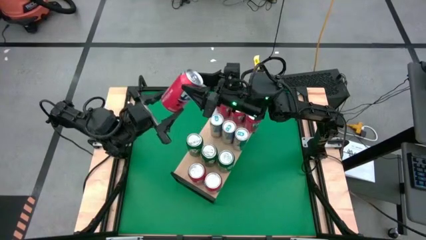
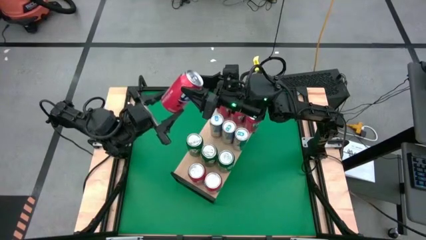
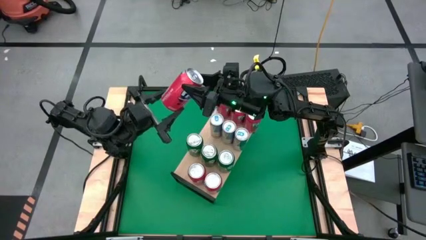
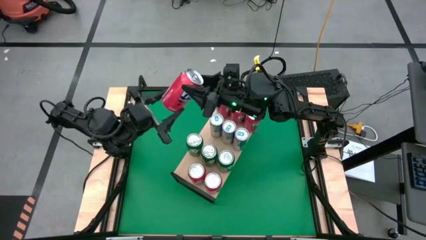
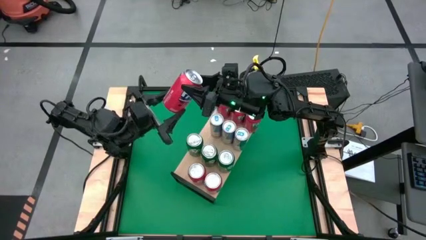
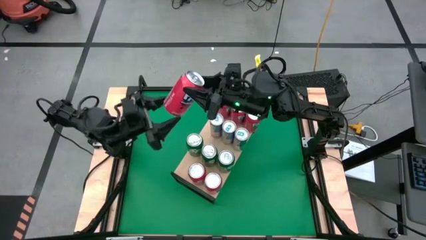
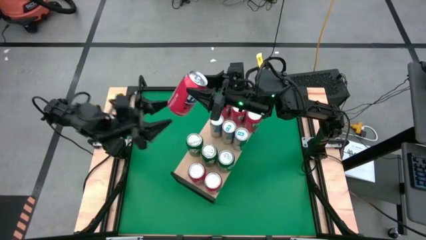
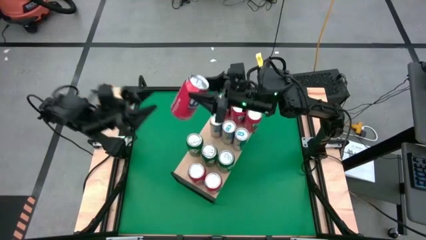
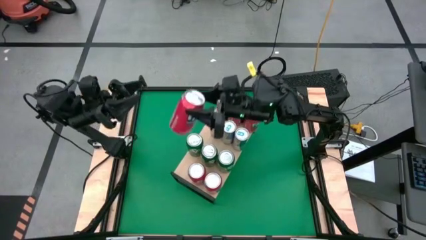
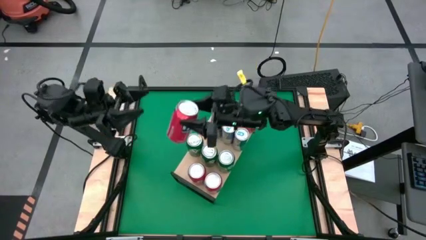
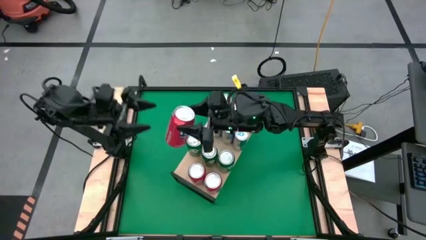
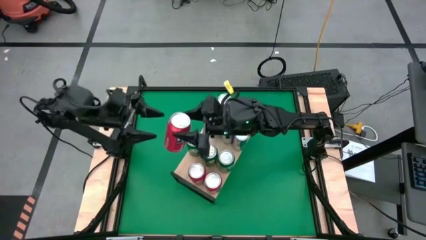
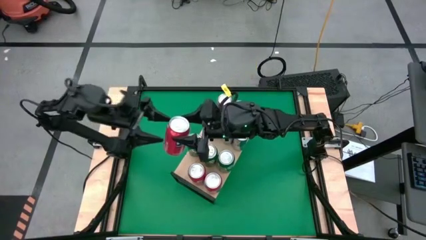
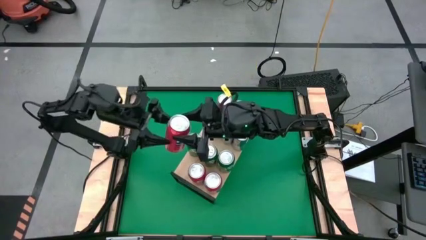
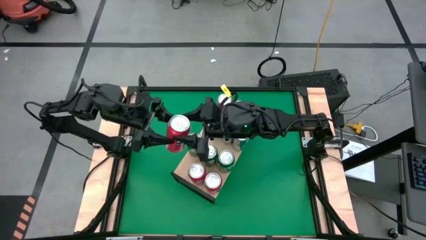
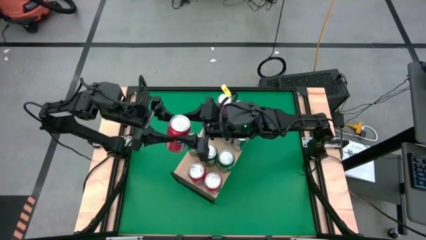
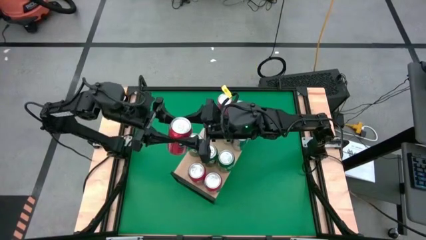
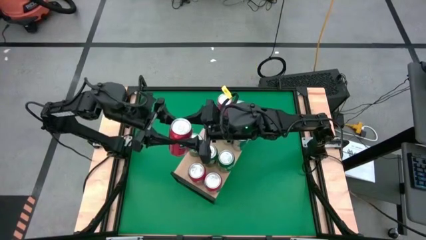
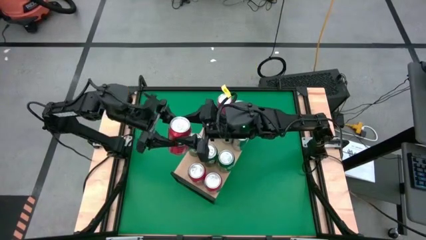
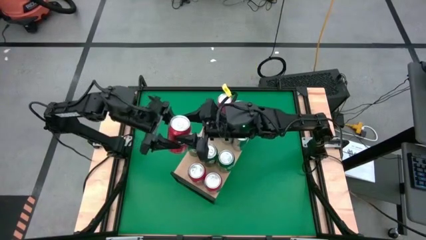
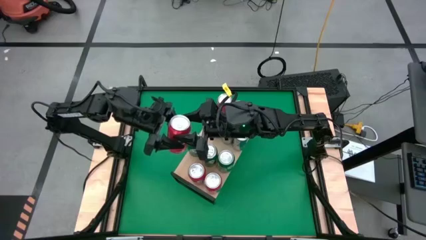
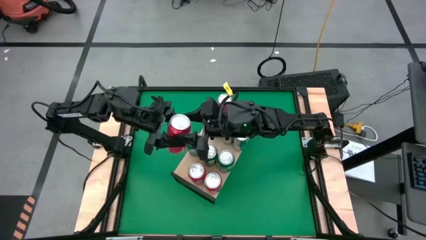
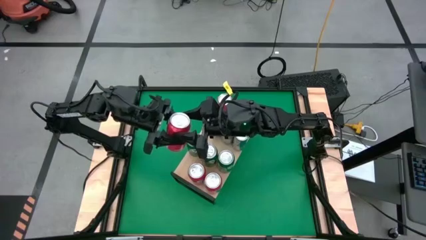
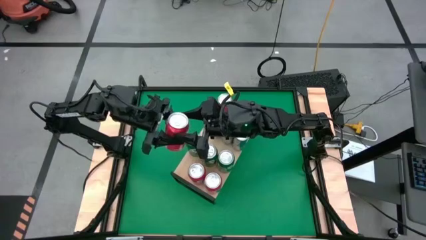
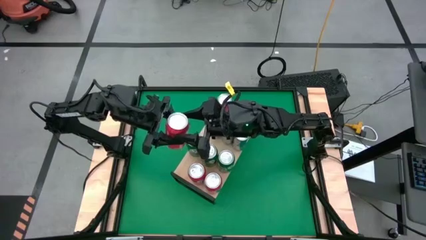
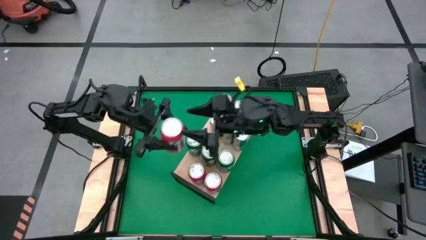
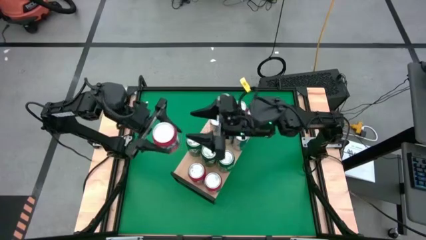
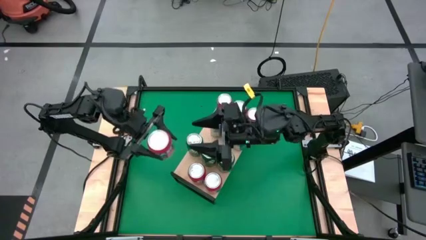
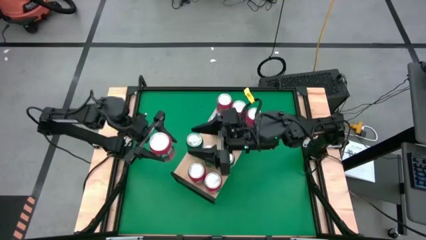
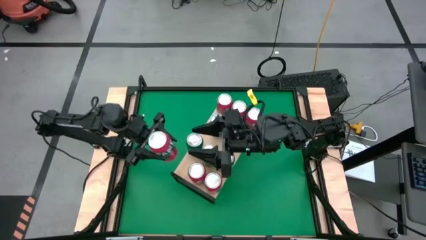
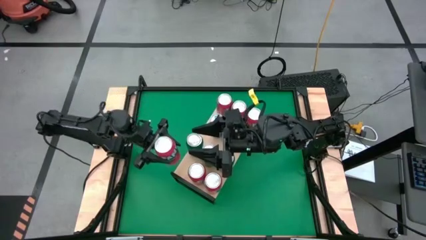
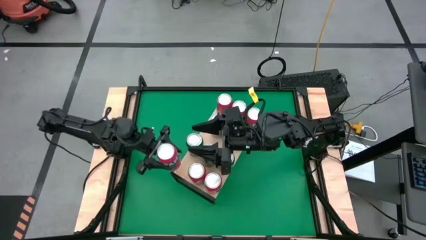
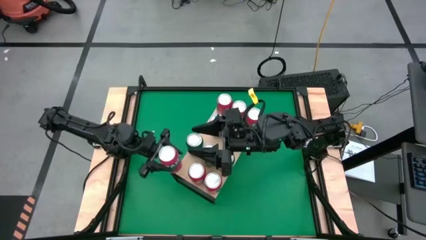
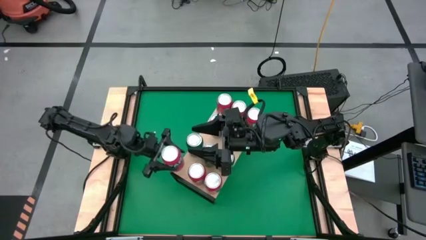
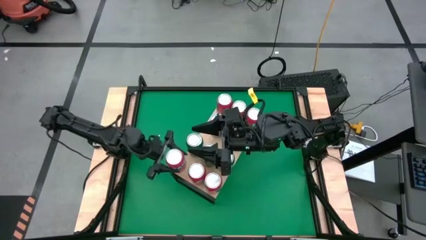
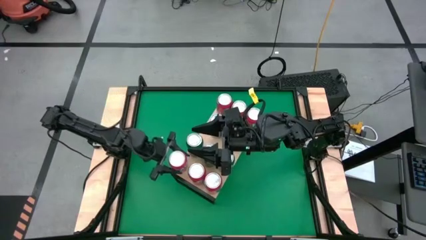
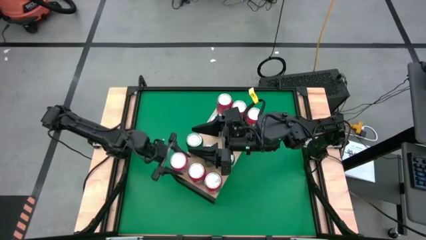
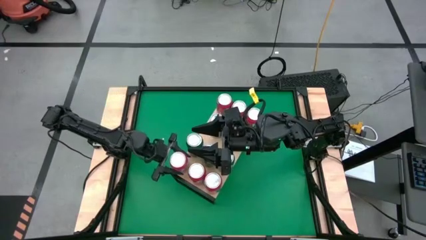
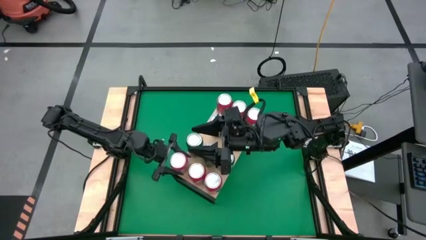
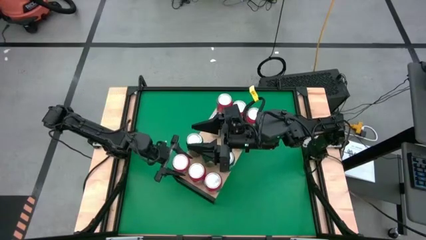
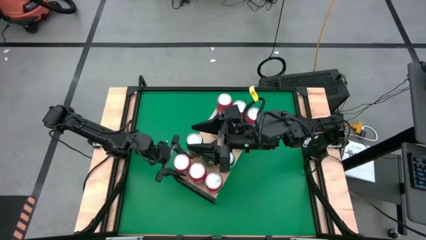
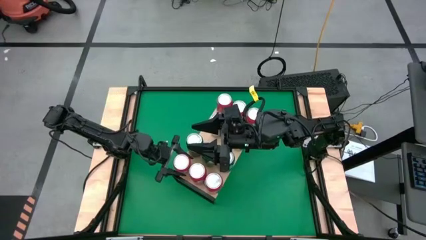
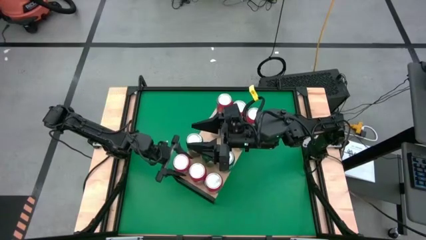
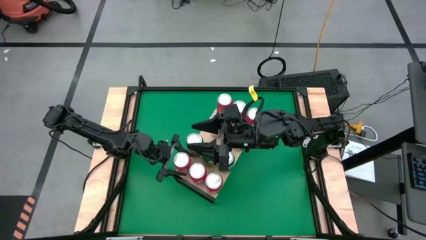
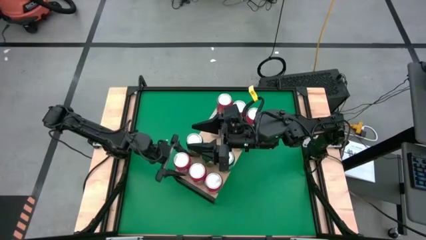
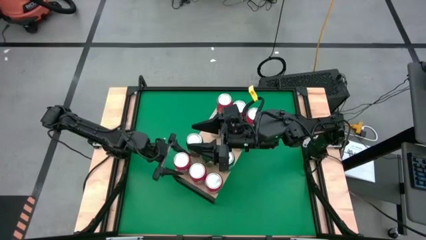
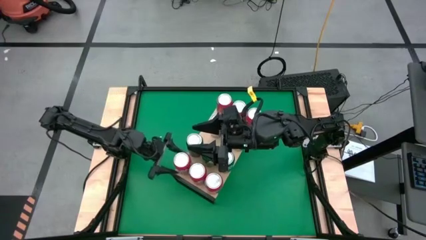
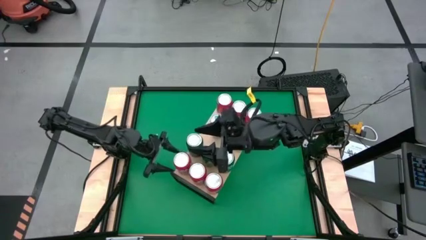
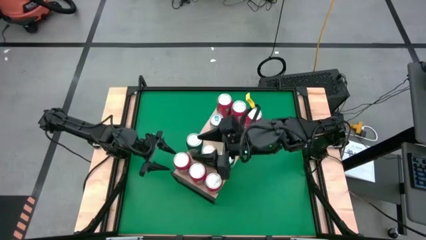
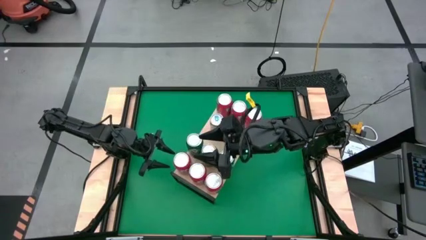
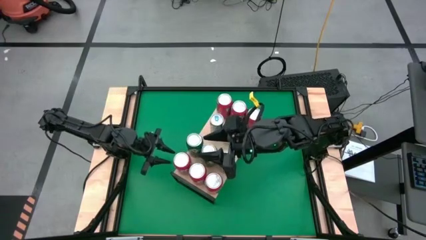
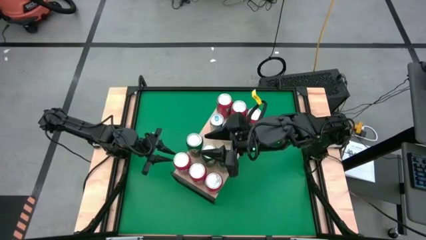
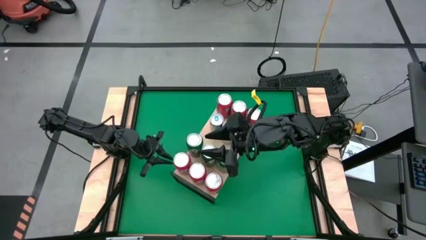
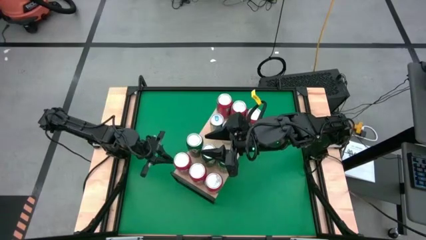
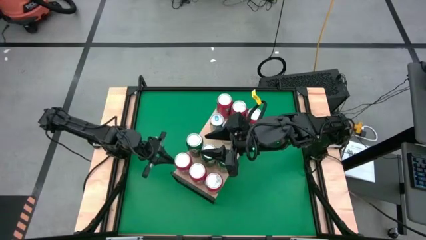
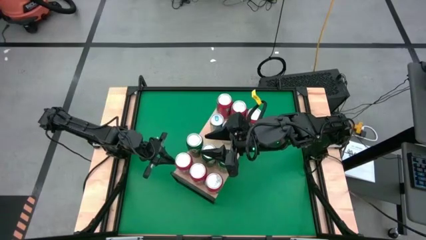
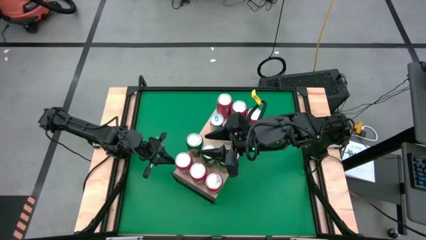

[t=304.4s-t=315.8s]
Task: Sort soda cans
Put the red soda can on the shelf and align it with the bottom red soda cans

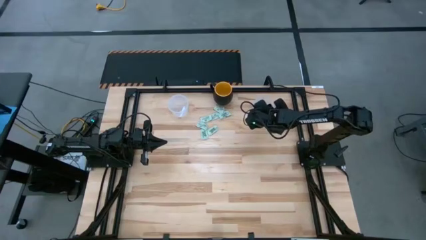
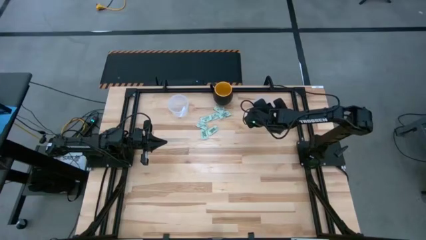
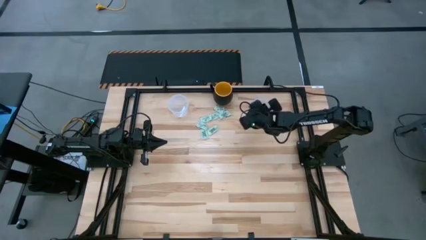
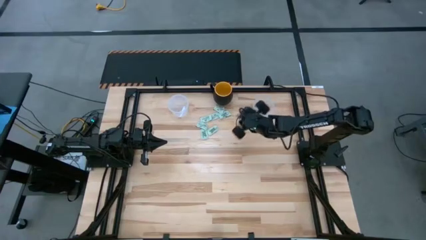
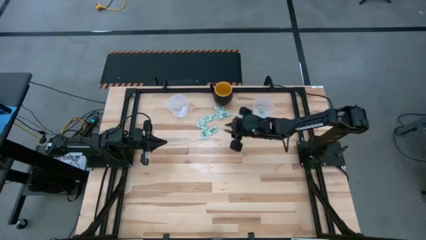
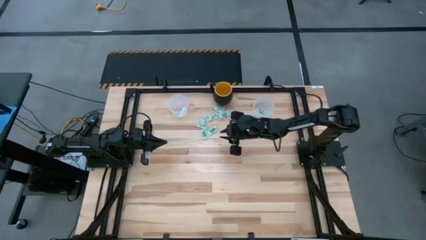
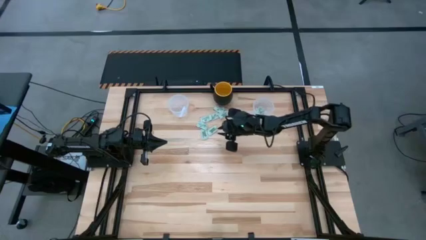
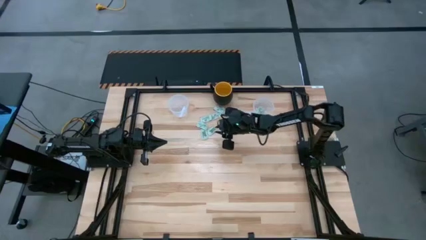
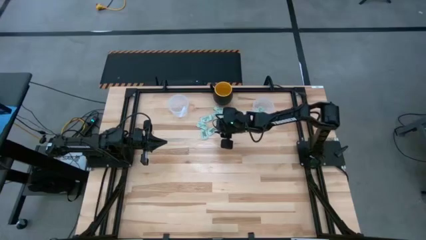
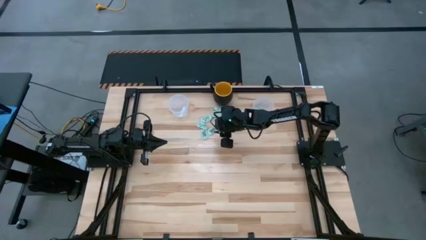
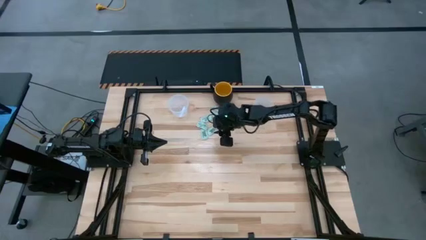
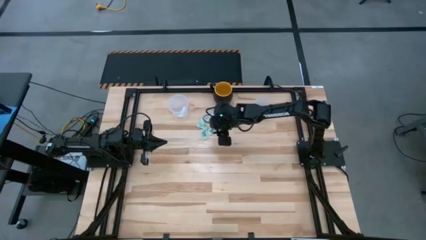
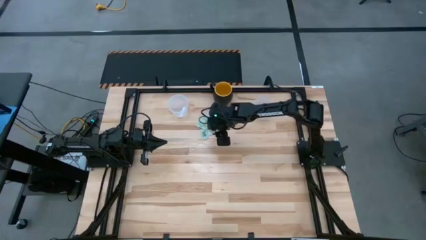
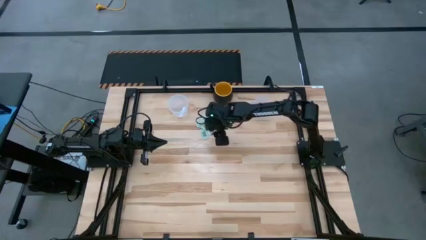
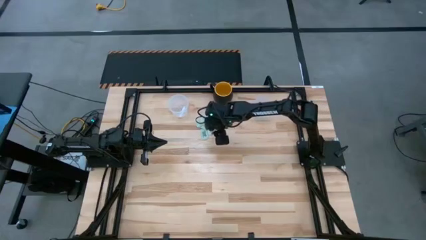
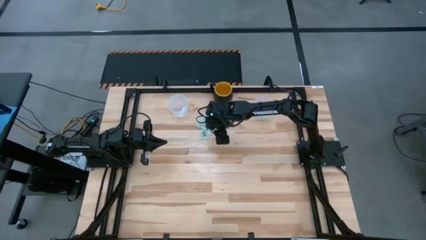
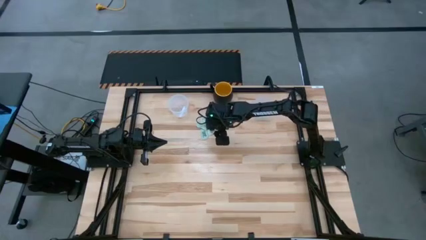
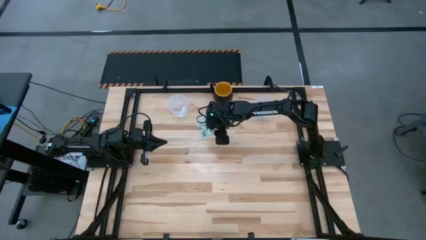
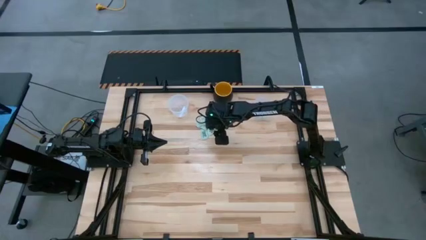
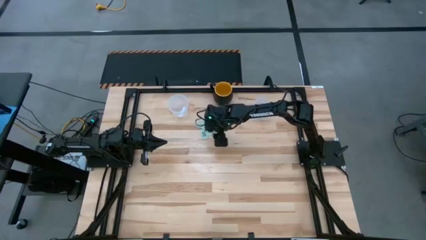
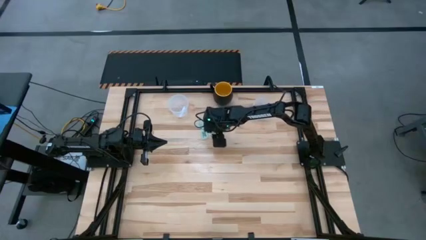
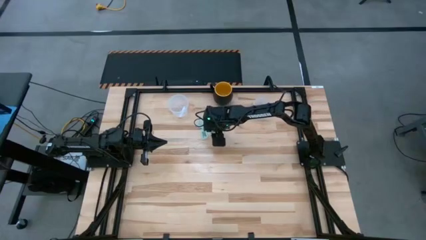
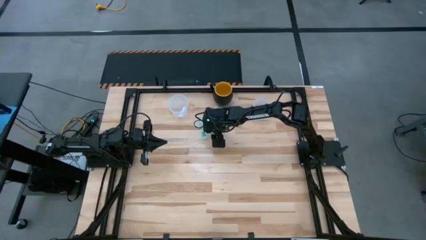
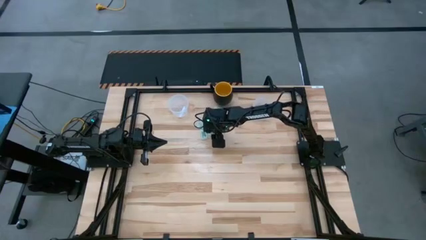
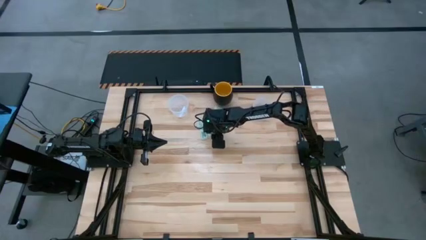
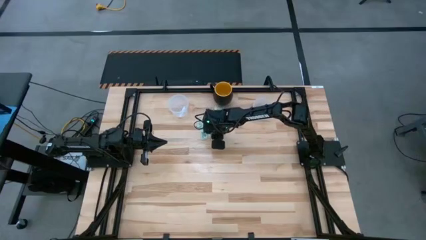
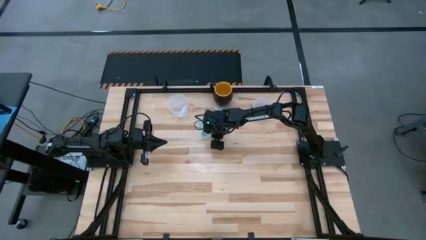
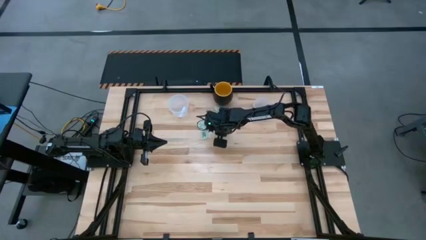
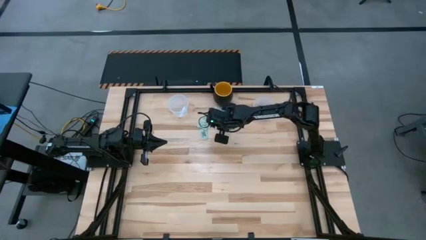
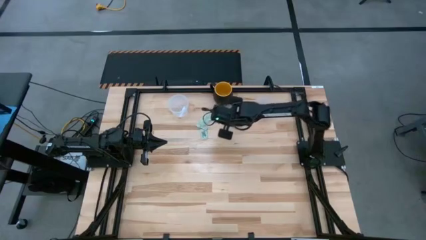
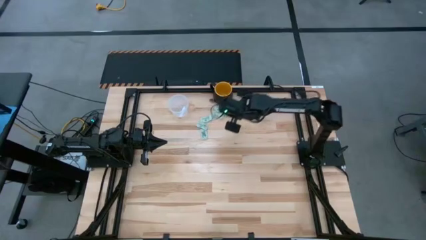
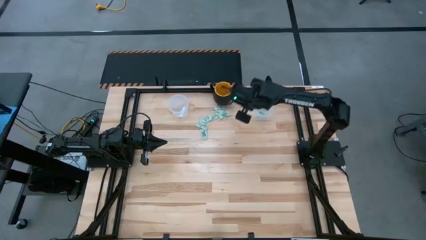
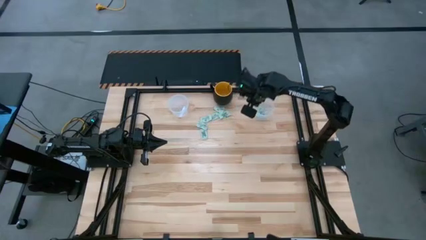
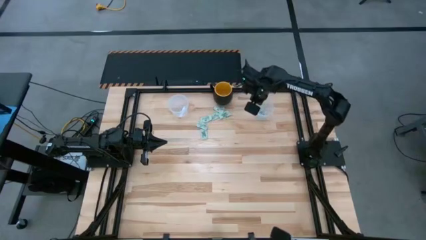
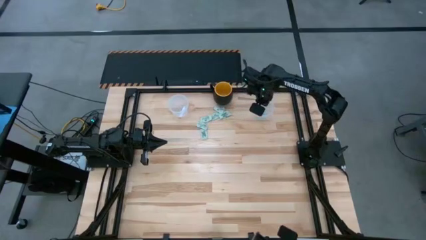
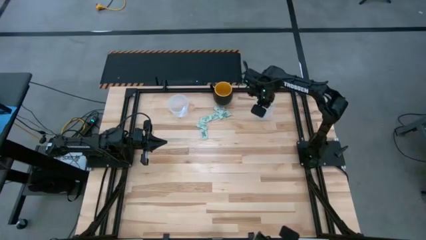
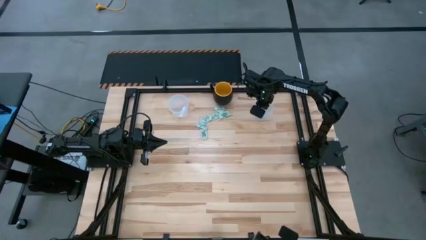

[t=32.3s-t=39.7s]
Task: Pick and place Stevia / Truvia into bins
Put the stevia packet into the right transparent container
